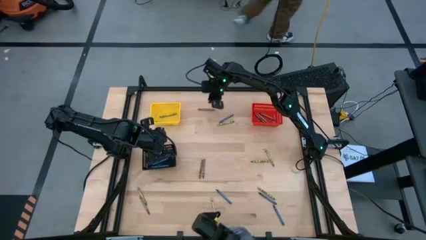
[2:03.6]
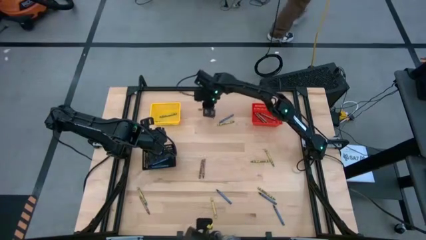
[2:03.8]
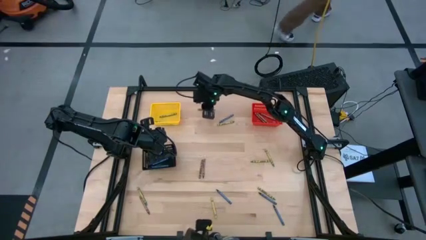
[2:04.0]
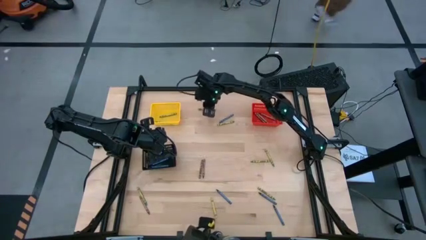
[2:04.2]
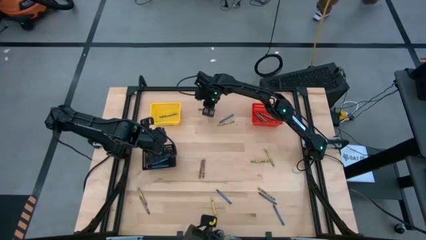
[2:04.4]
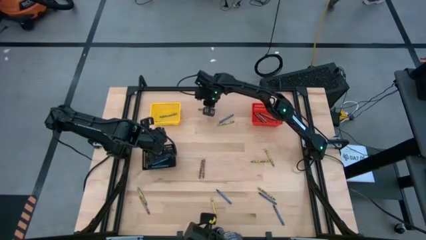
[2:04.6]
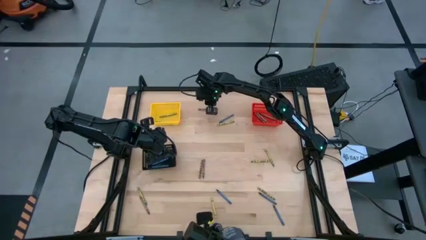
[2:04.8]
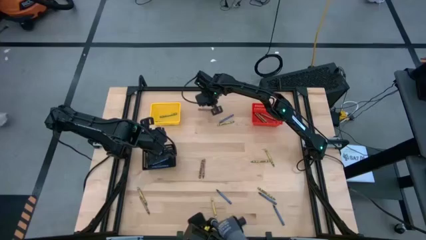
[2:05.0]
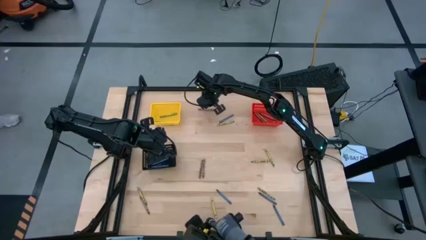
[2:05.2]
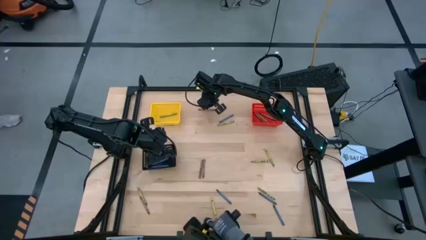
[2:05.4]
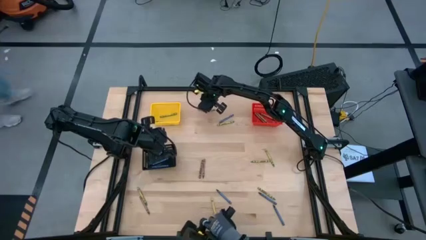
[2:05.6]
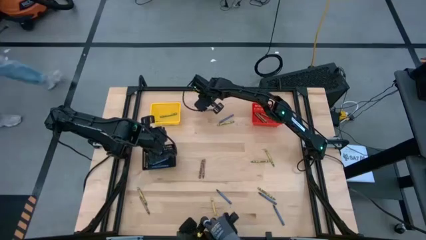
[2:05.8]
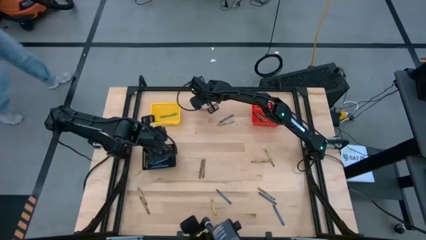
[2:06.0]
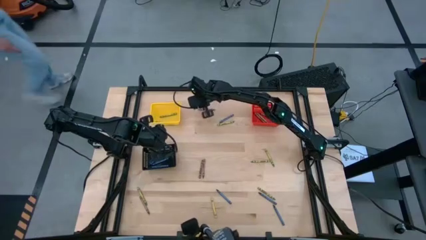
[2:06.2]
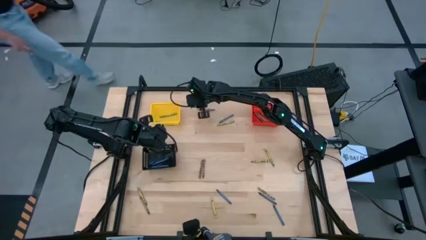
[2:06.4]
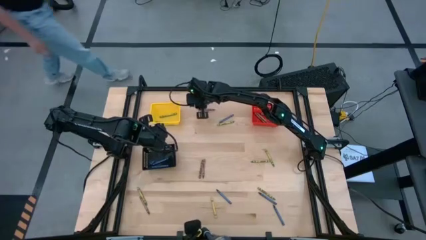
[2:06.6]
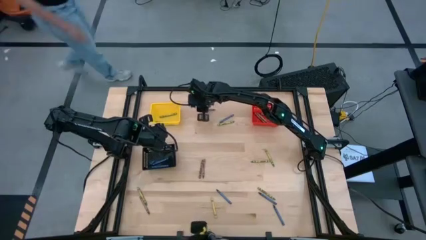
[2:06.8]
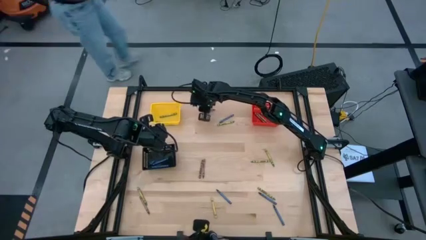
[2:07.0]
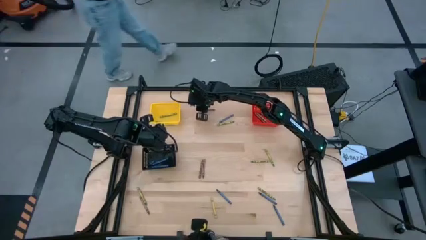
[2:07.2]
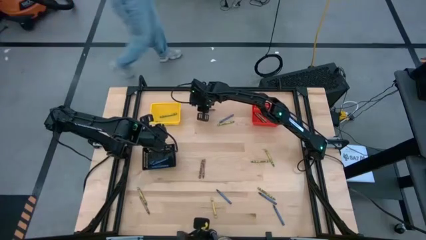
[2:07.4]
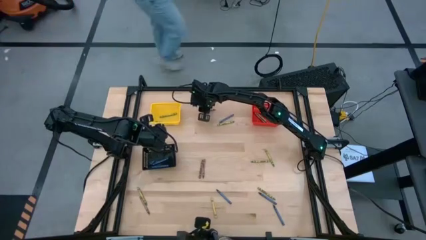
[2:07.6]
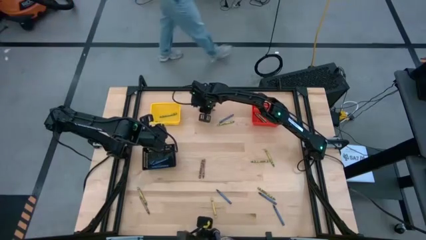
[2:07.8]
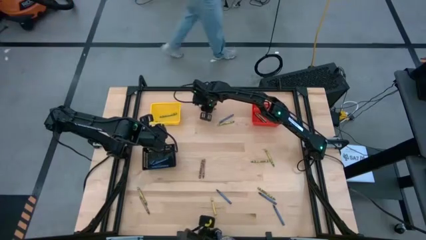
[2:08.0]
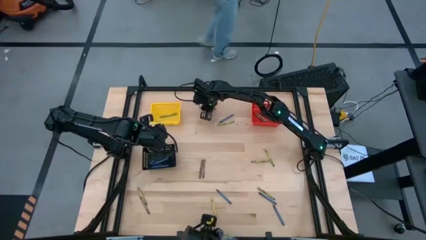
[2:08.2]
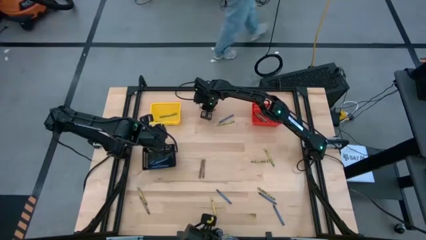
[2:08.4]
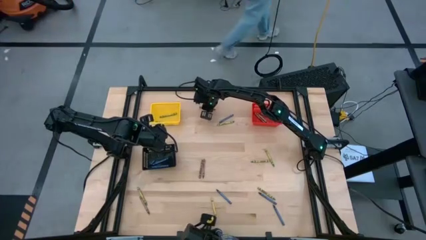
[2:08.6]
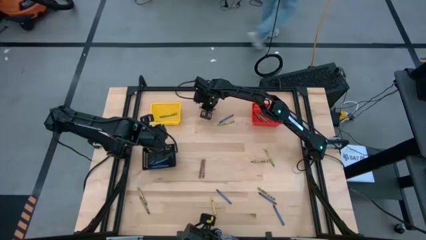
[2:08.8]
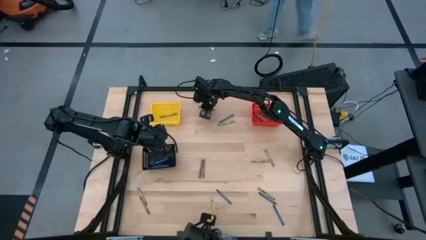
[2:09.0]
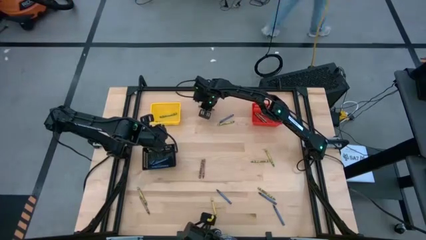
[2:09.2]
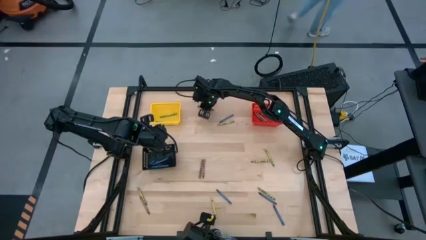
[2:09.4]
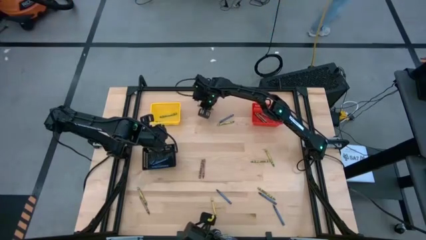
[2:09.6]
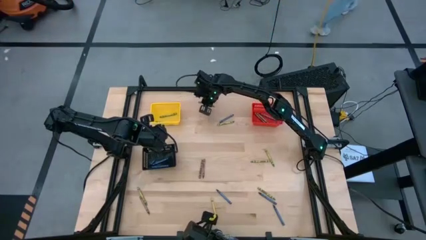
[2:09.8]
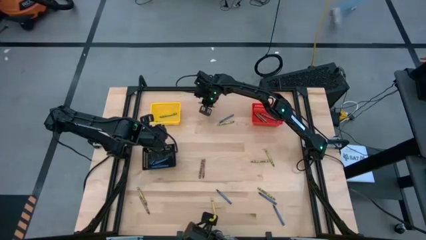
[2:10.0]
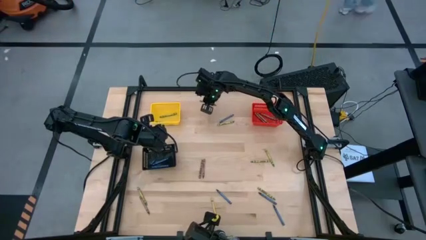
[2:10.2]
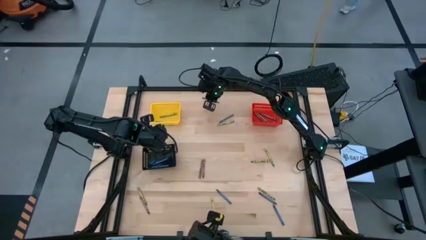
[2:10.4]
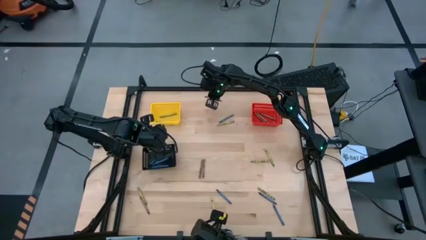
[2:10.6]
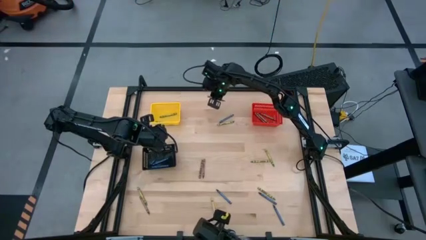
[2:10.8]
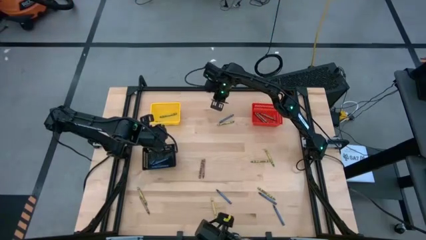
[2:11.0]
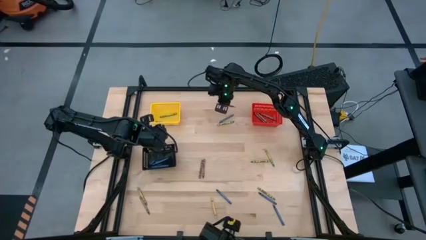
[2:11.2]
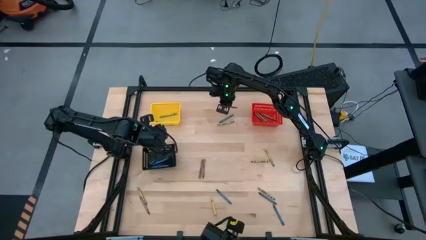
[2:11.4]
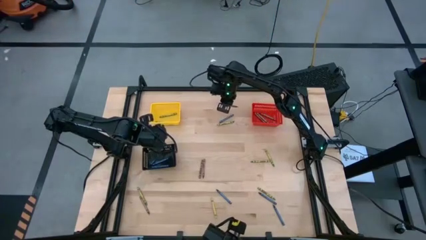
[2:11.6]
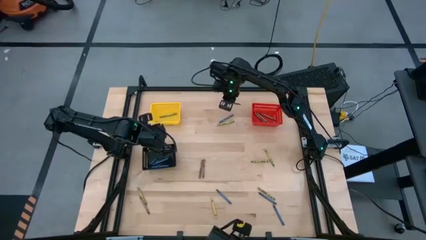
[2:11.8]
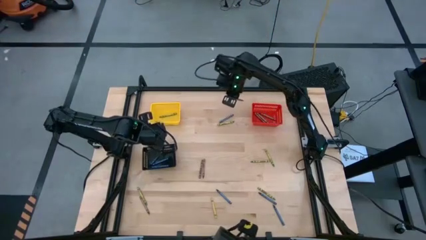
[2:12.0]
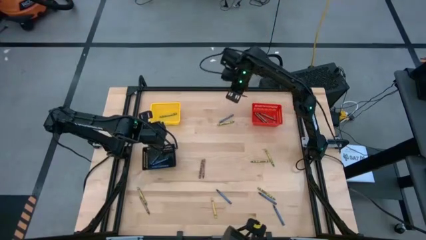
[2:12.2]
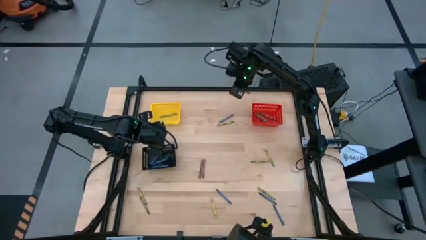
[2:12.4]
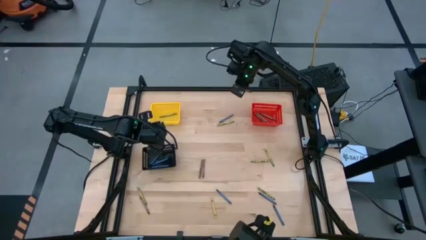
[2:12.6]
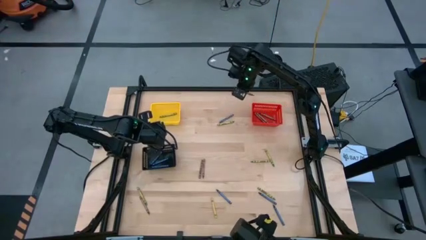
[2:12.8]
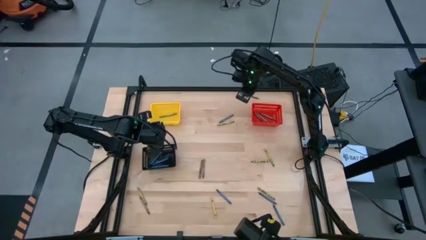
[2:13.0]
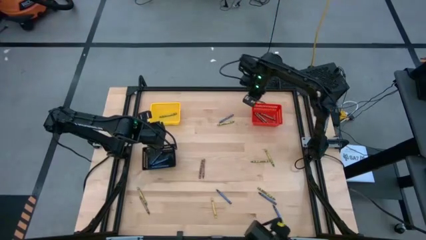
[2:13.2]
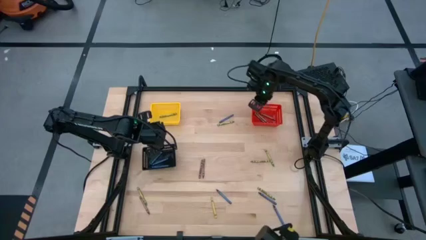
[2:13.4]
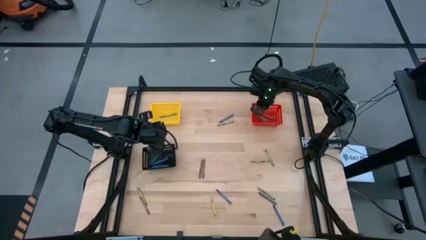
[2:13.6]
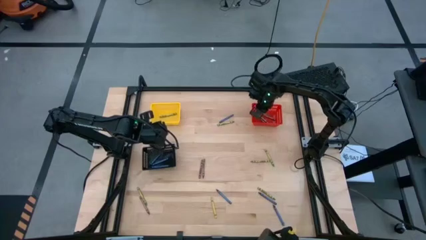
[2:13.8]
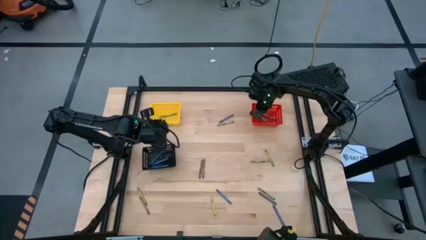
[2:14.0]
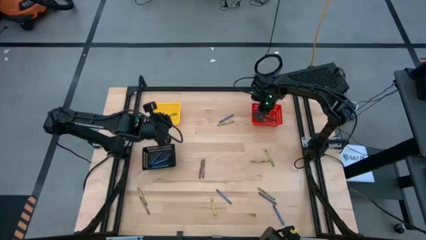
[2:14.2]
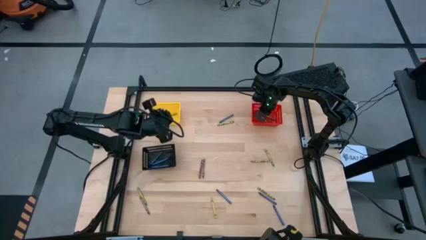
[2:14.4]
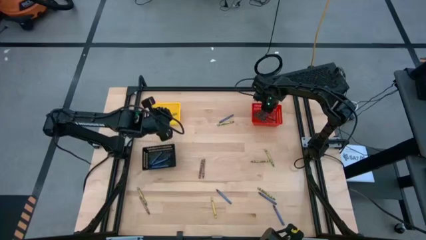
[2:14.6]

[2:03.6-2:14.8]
Task: Sort crayons
Put the brown crayon into the red bin
